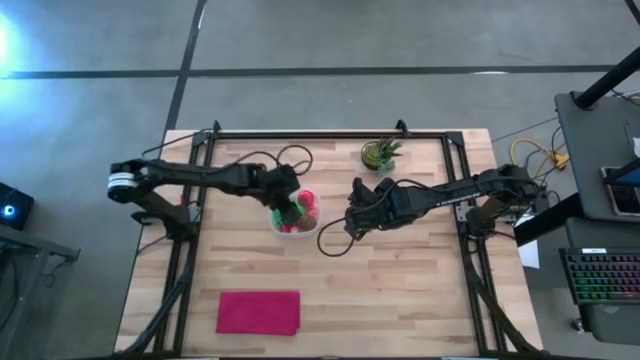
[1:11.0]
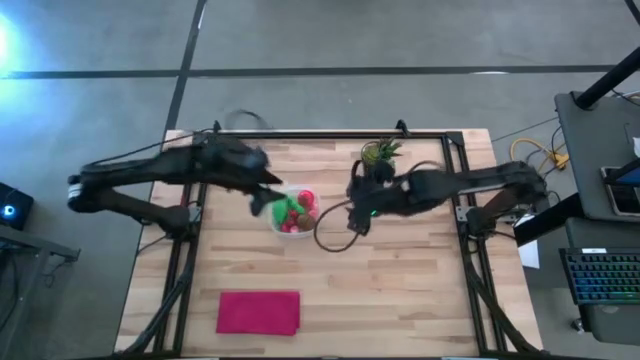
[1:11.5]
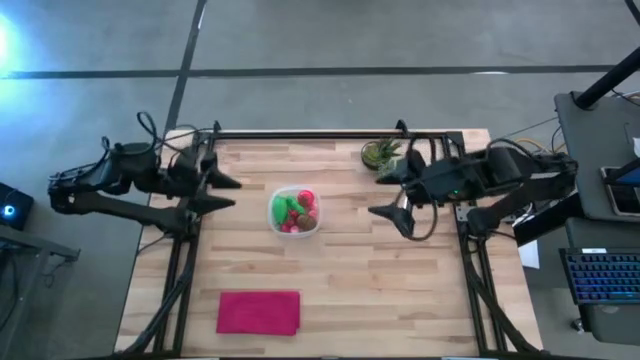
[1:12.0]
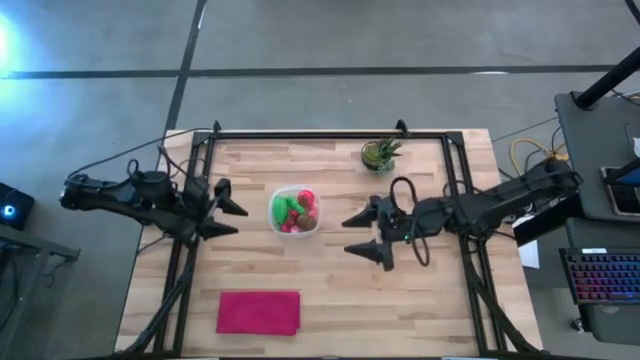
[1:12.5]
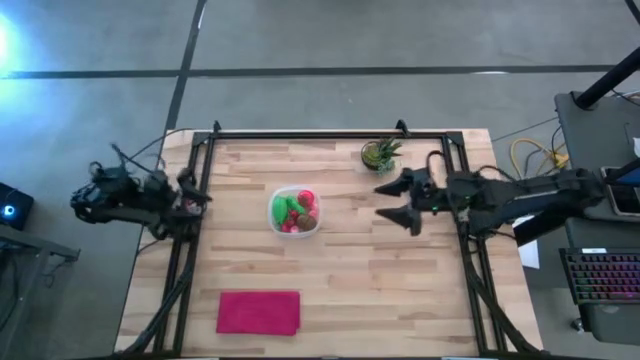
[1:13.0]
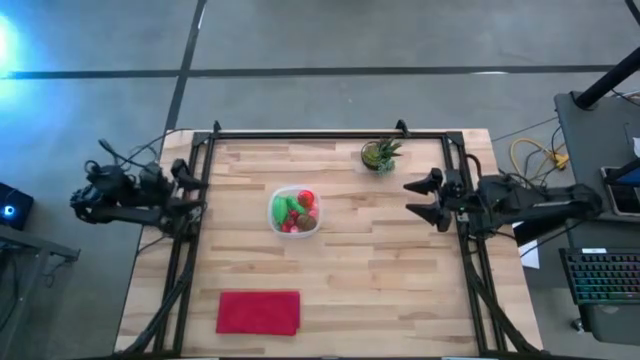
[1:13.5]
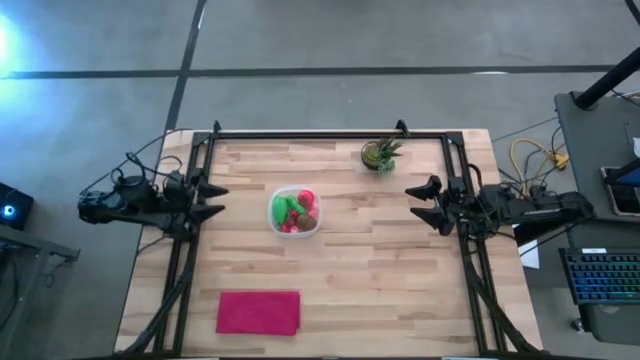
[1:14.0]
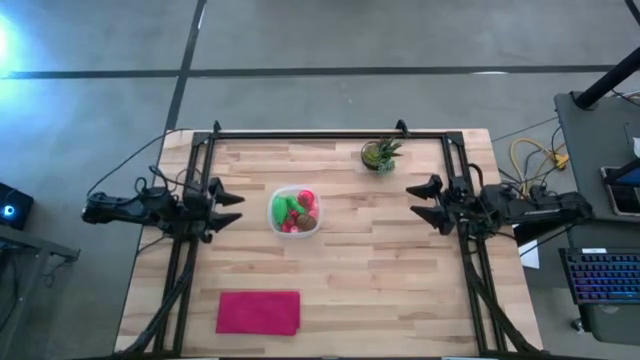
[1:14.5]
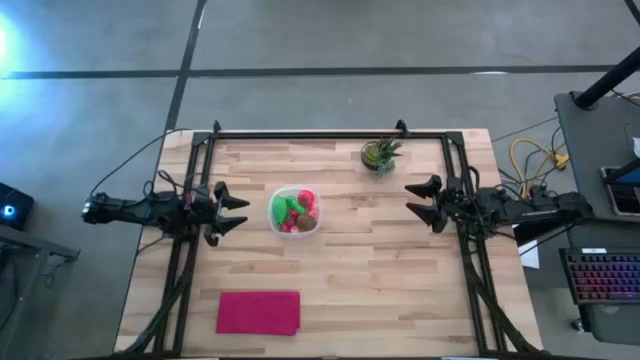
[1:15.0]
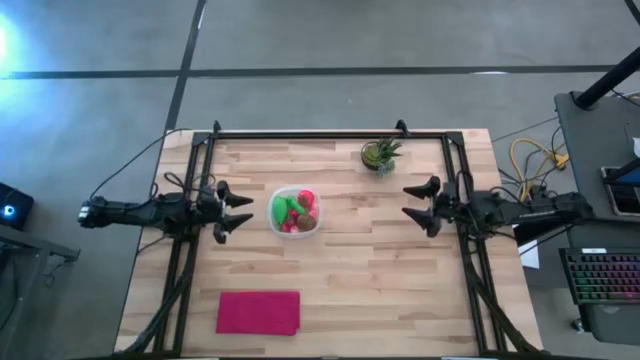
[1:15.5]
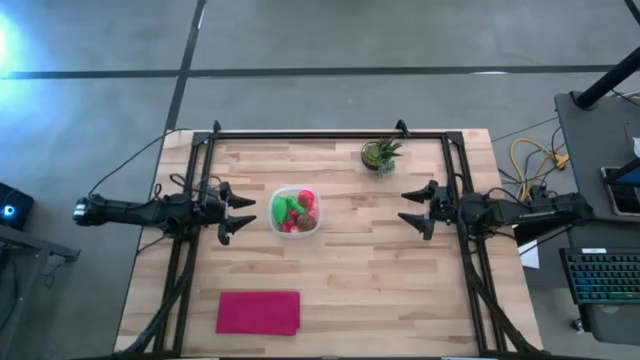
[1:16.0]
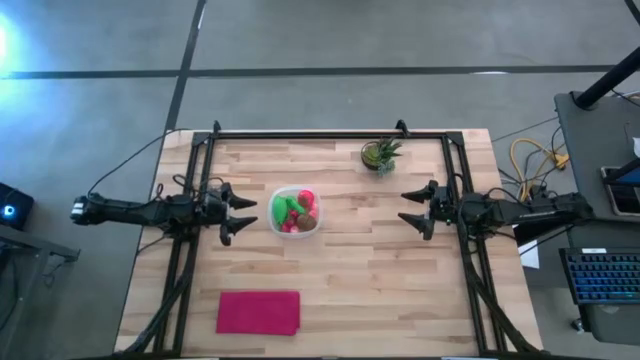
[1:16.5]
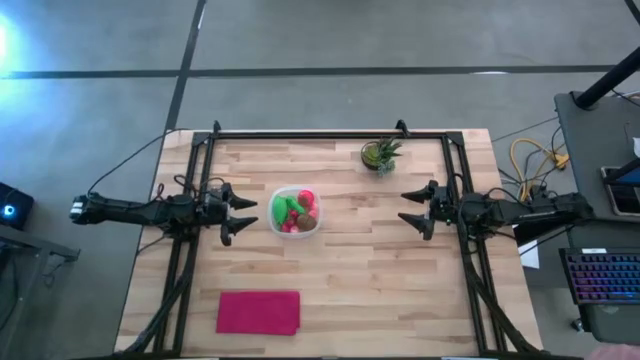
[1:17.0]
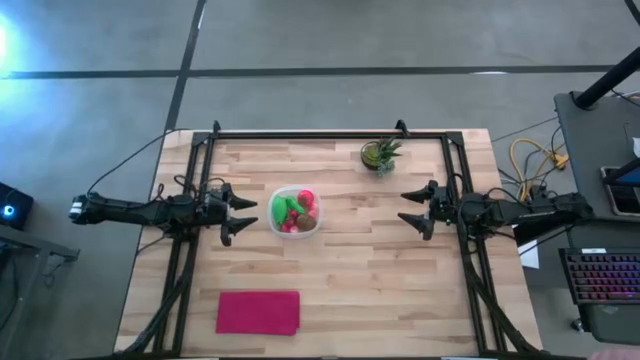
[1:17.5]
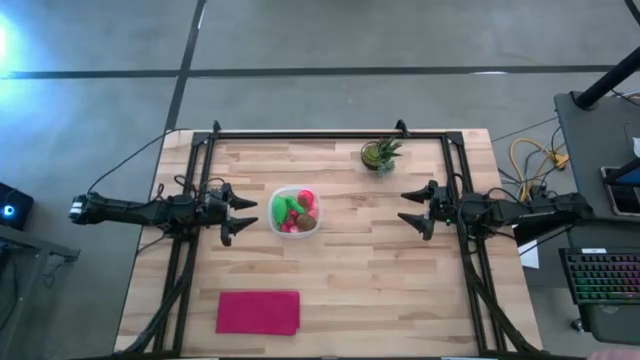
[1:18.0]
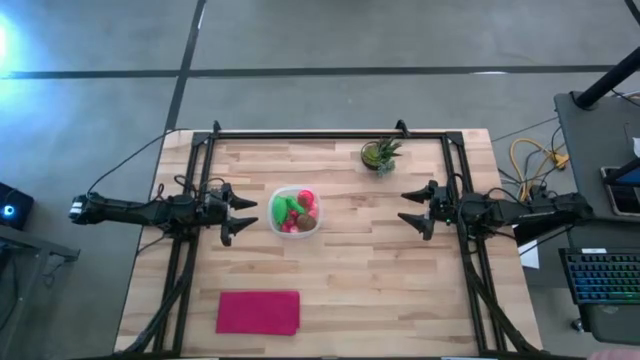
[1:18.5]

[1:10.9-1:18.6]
Task: Pick and placing Produce into tupperware
Return to Home Position

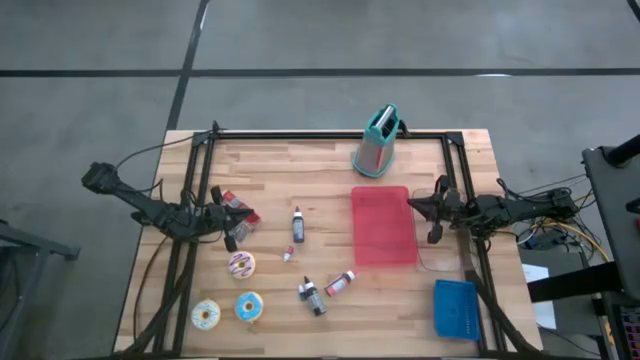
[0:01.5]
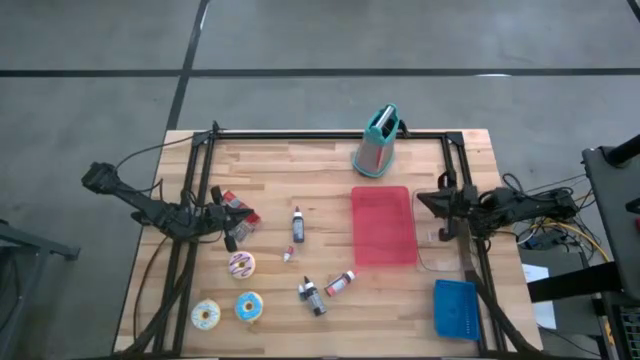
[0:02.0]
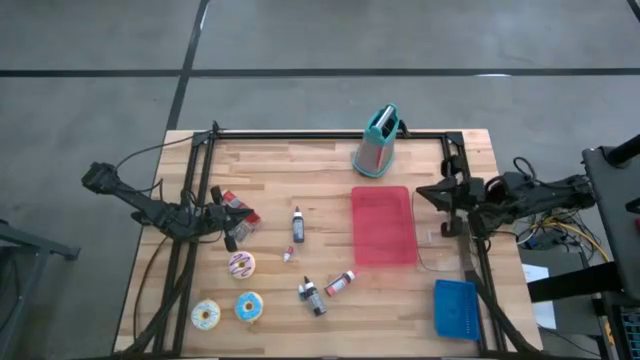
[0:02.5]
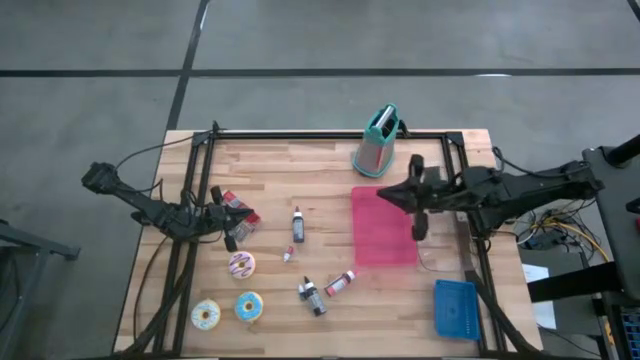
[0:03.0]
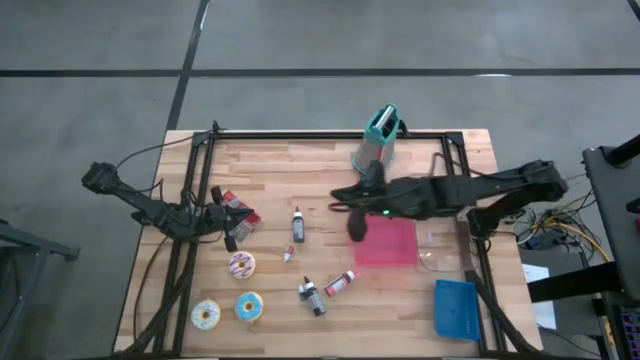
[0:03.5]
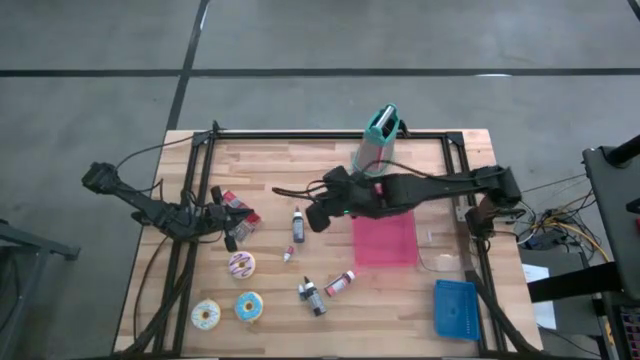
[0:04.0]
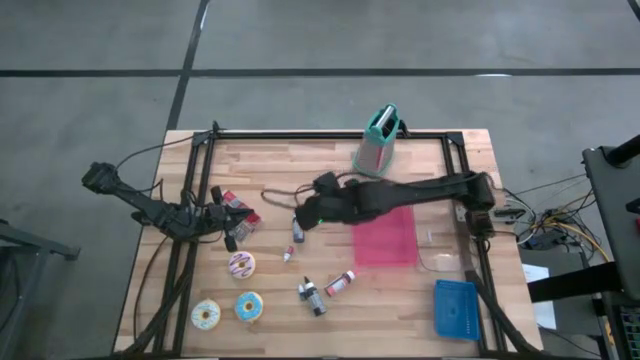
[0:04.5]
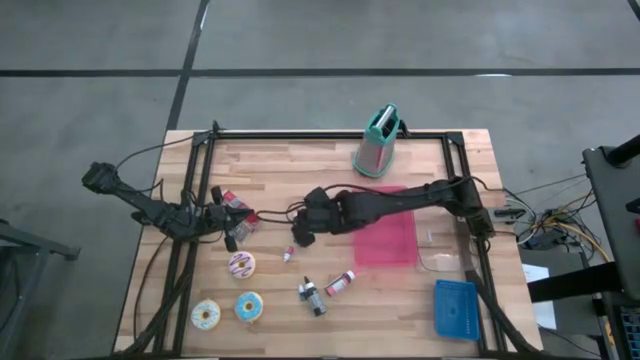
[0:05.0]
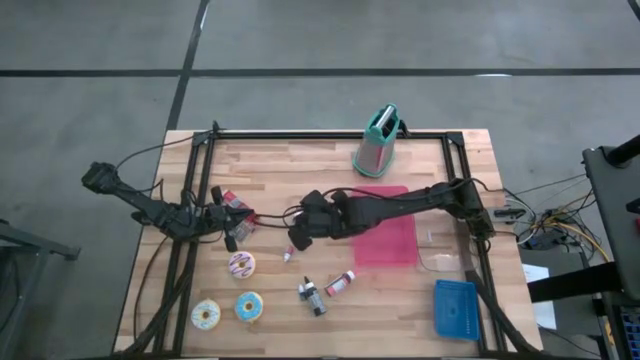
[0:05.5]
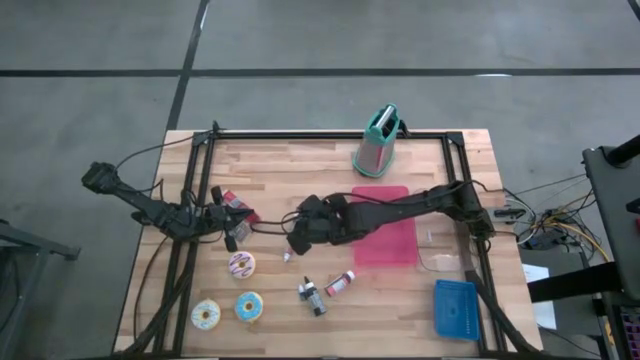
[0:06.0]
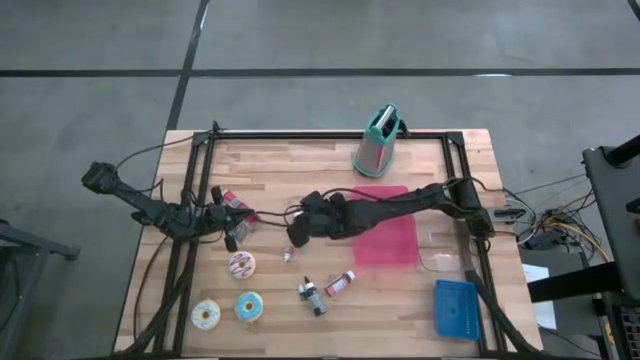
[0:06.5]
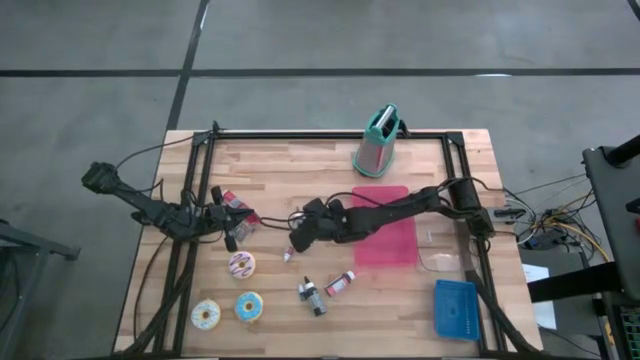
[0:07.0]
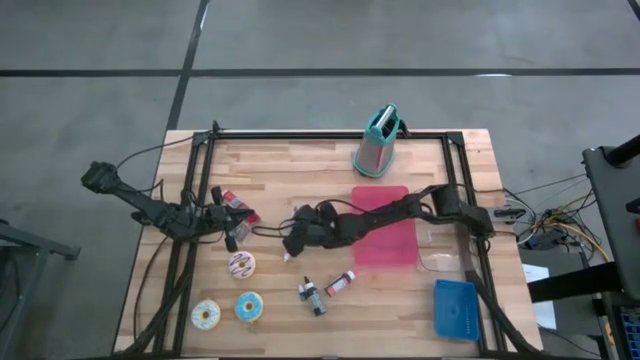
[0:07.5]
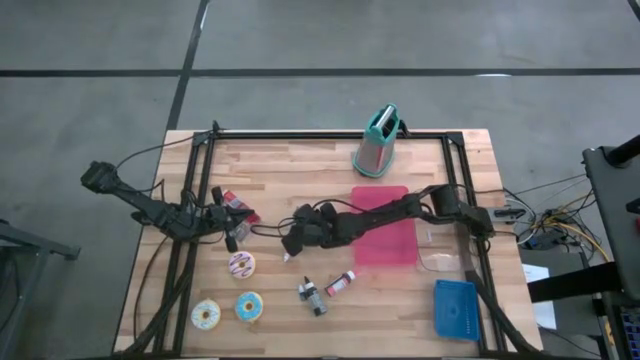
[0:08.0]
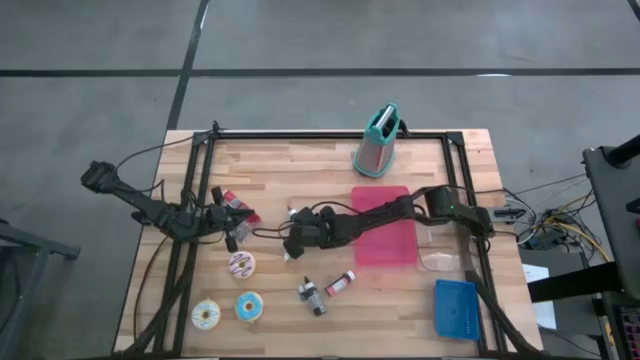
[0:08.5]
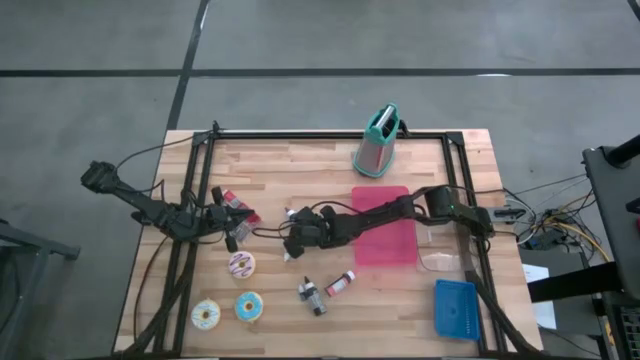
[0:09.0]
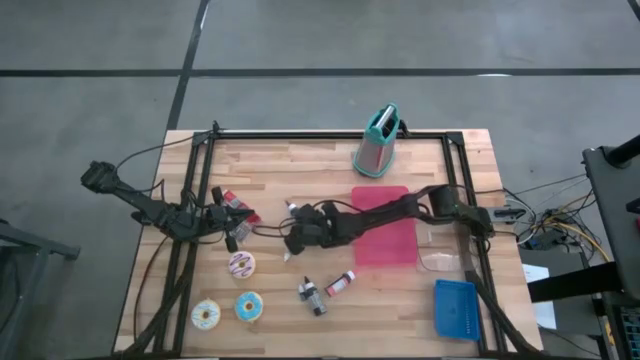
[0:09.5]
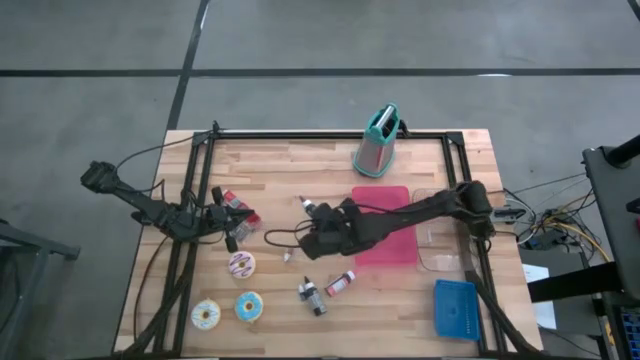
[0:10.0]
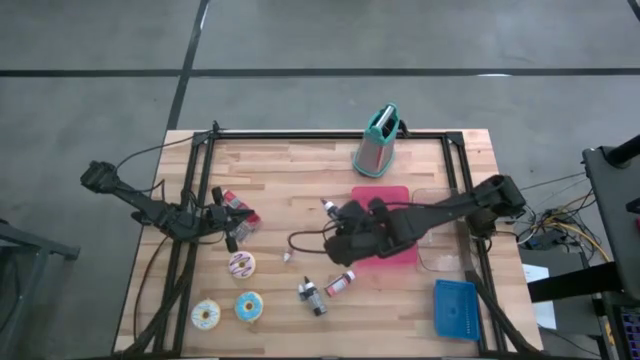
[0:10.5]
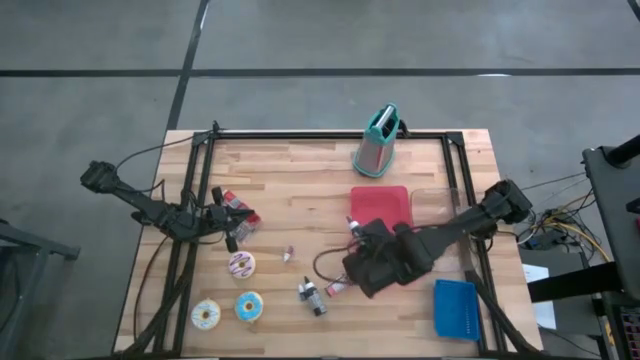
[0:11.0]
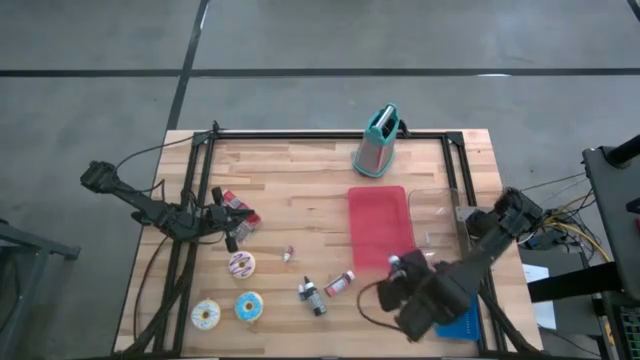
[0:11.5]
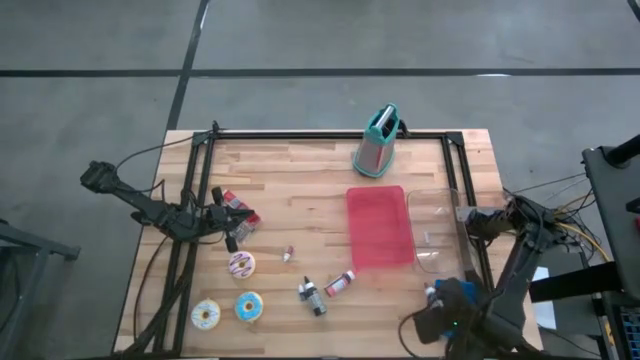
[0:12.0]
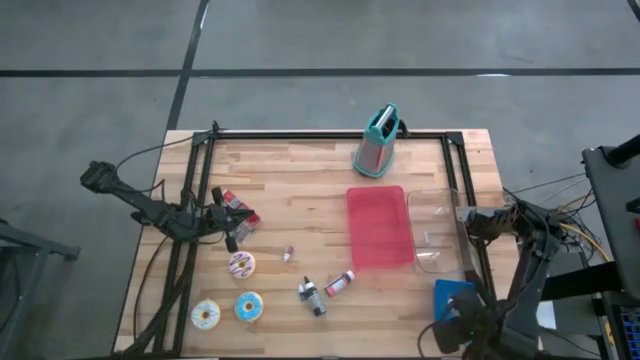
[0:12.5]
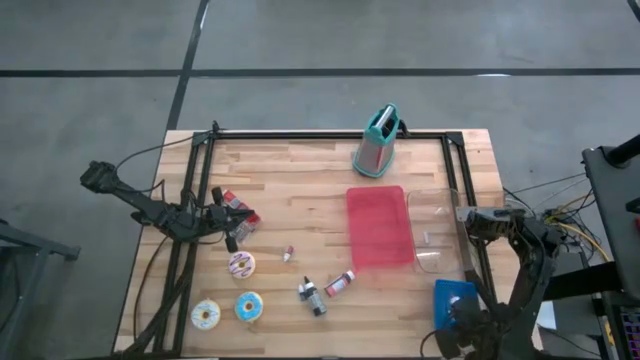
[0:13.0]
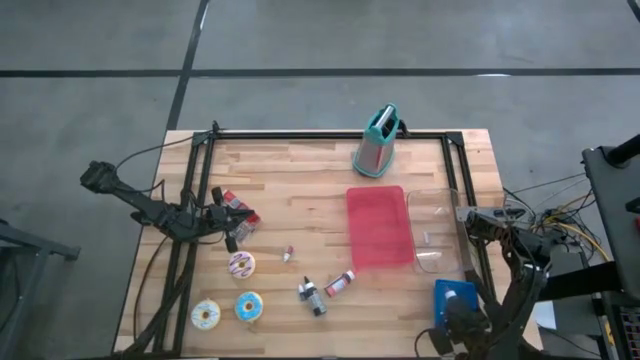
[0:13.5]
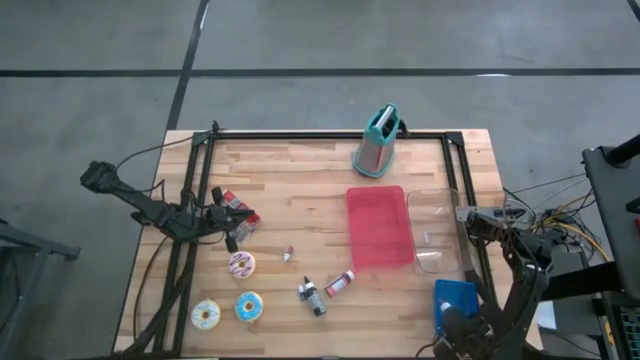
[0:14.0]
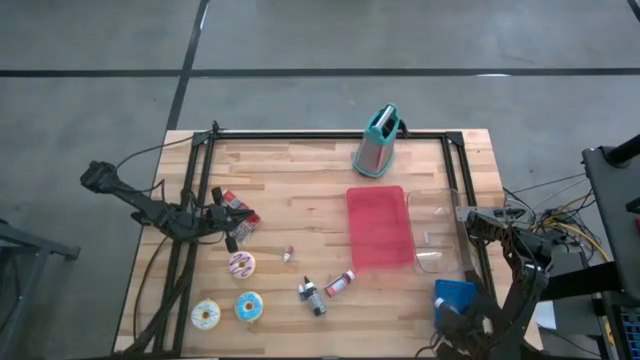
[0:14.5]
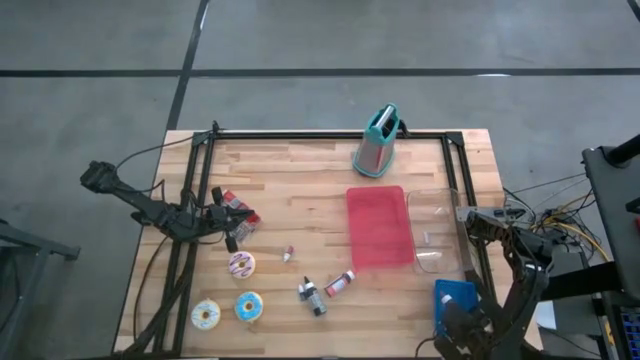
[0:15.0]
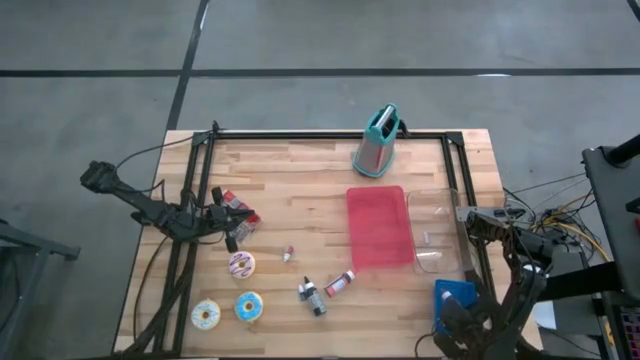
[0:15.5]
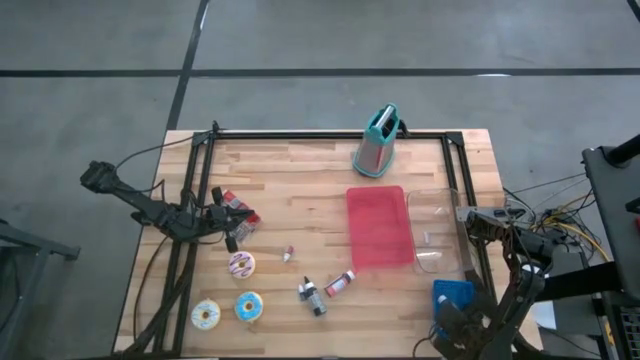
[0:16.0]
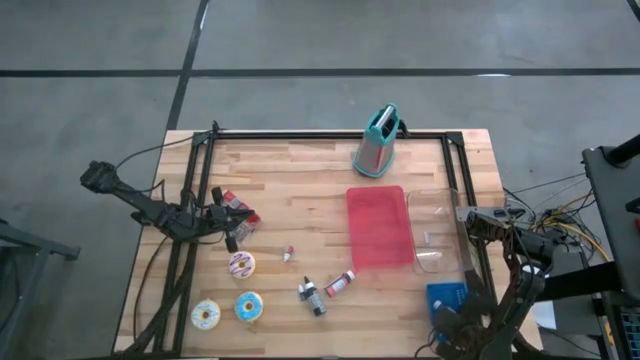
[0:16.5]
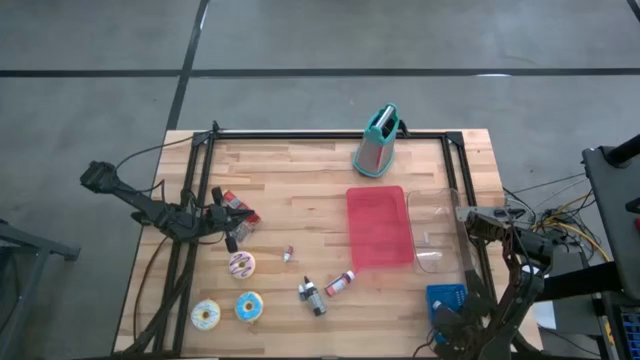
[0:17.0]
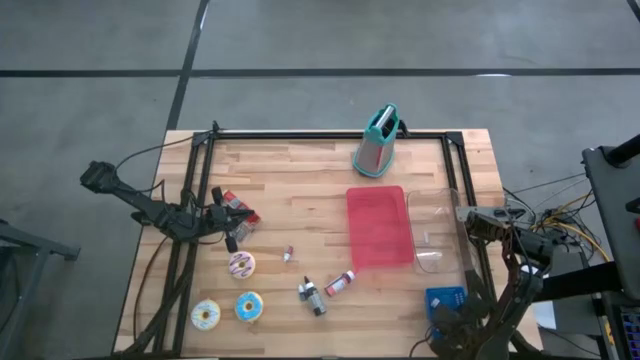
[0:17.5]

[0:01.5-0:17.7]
Task: Pick & Place Food Item
Put the purple food coloring bottle into the blue bin
